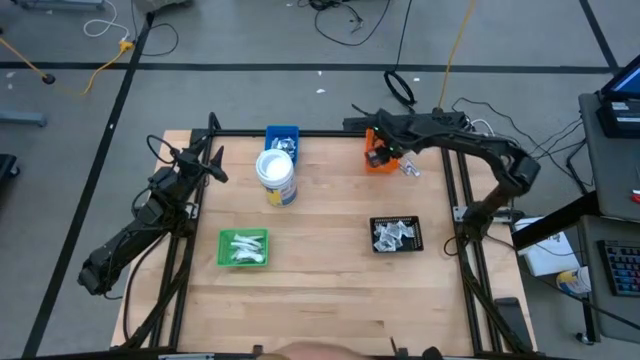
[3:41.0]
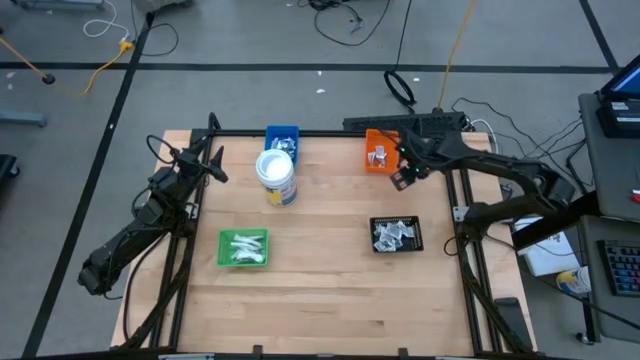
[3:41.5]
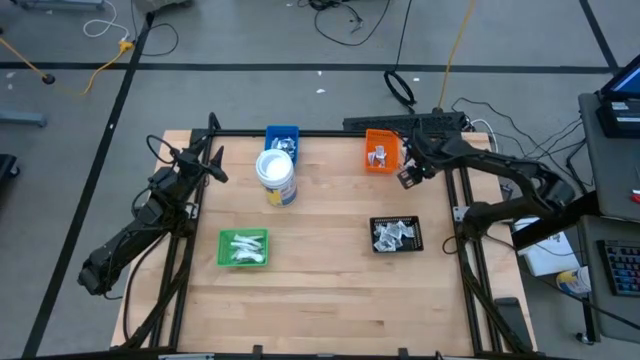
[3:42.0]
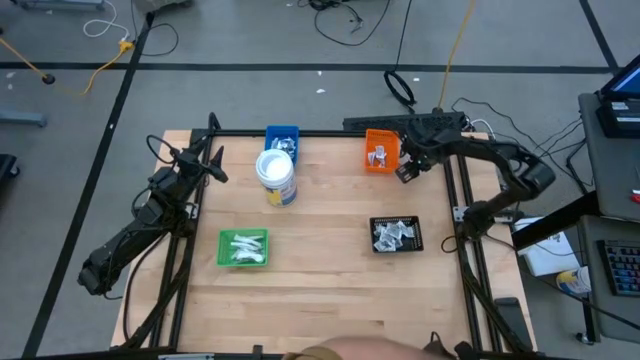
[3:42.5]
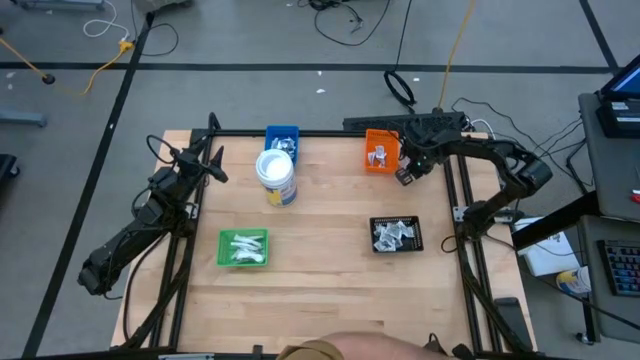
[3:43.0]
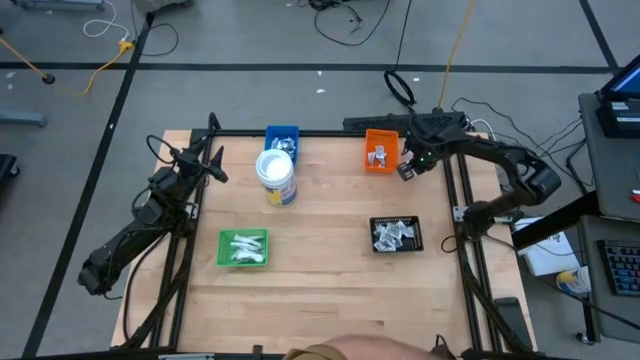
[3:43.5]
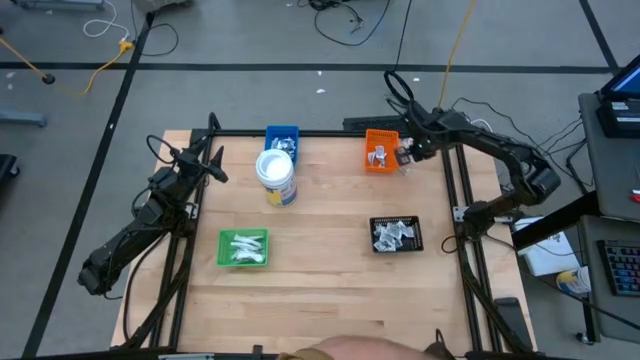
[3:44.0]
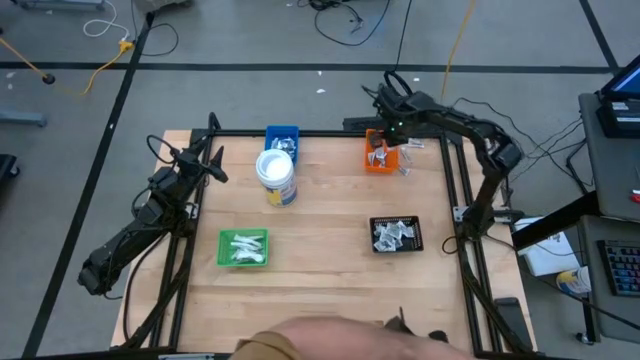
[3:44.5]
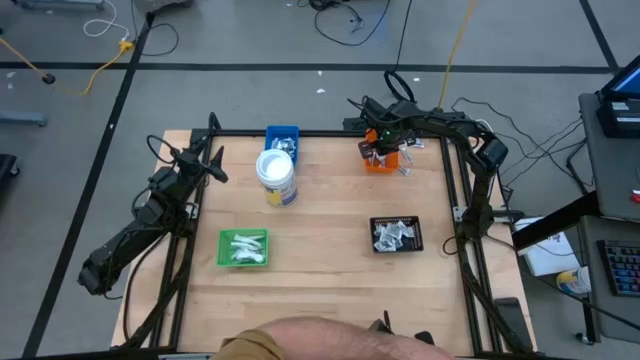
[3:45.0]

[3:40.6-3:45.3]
Task: Pick & Place First Aid Supplies
Put the orange ointment pack into the orange bin

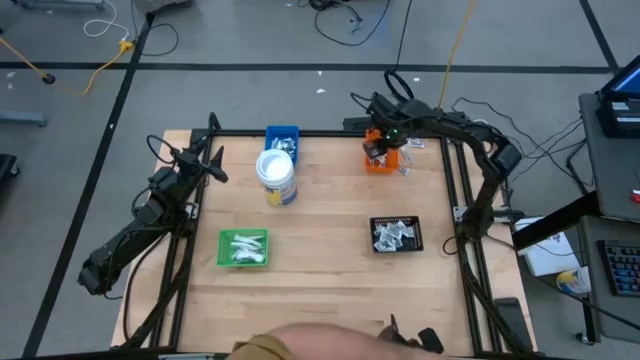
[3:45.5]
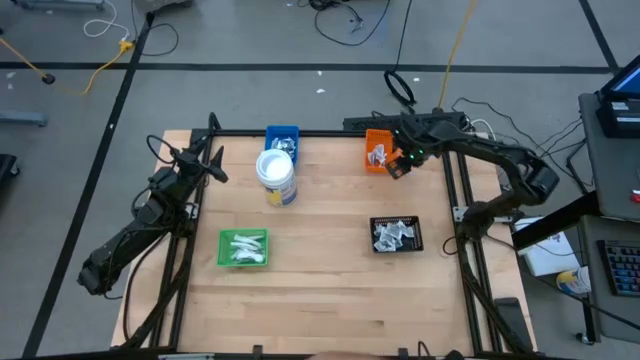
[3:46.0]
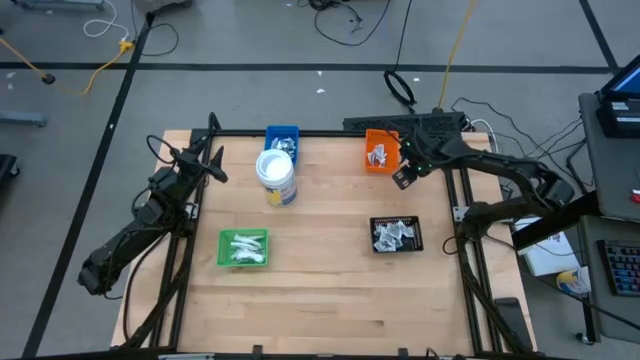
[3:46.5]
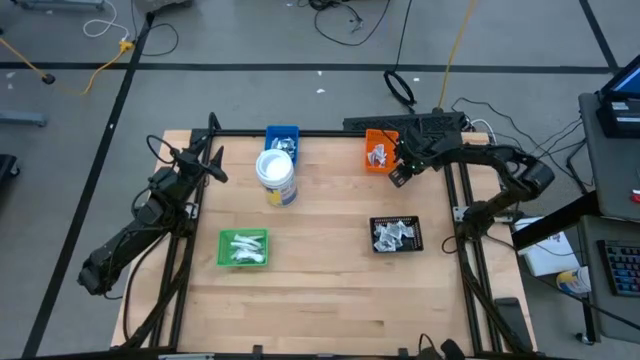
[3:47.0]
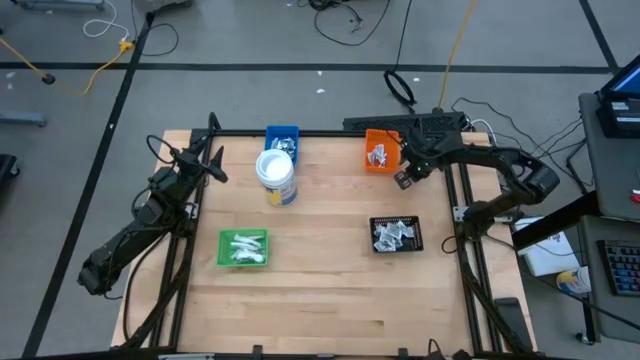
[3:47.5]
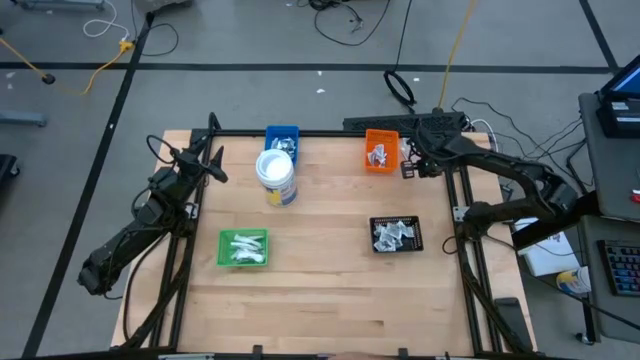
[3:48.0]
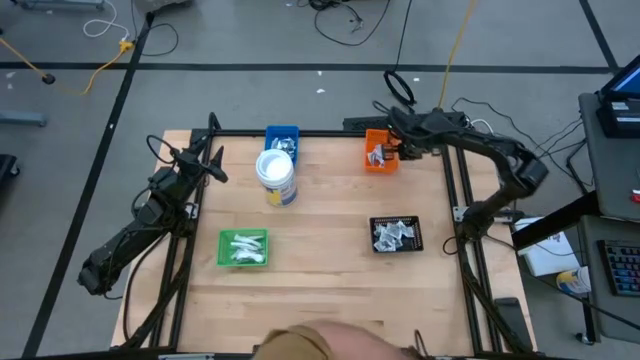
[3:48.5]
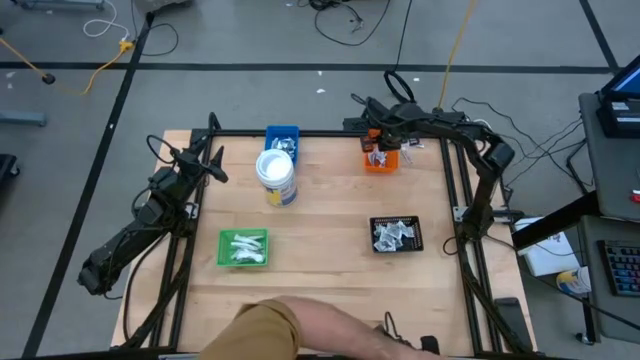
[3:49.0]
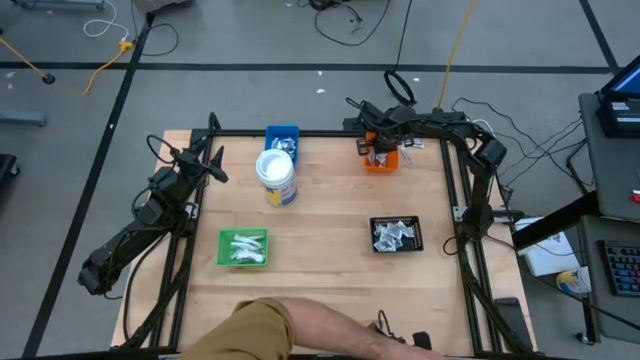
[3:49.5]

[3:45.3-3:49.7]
Put the orange ointment pack into the orange bin

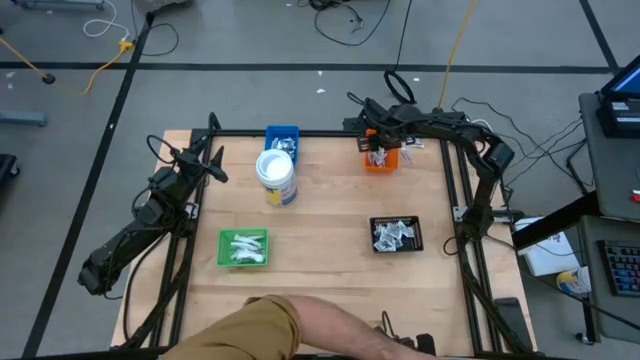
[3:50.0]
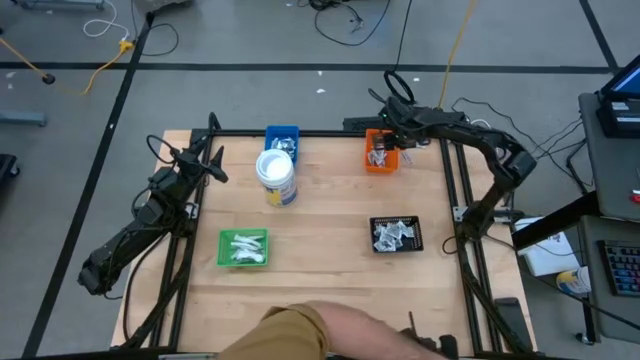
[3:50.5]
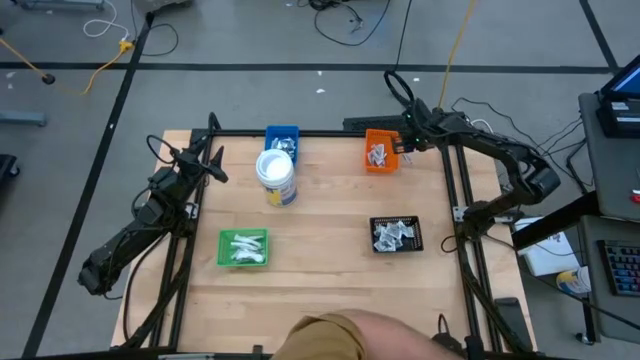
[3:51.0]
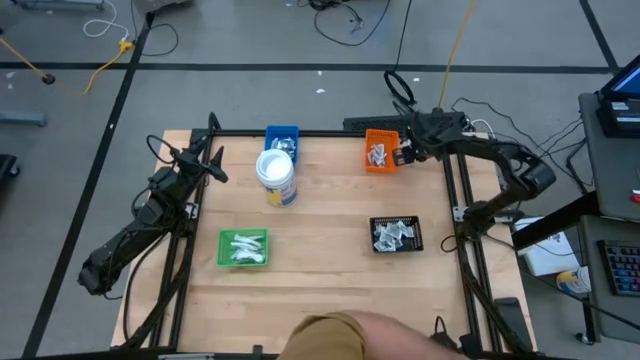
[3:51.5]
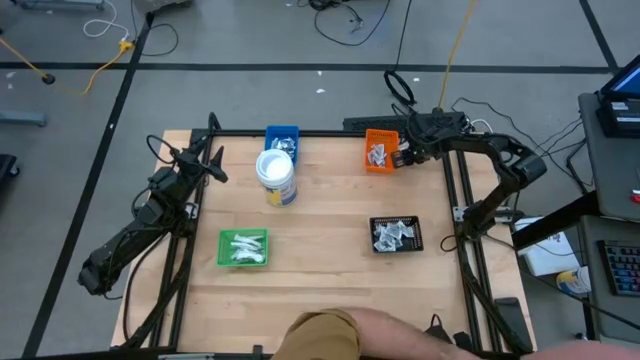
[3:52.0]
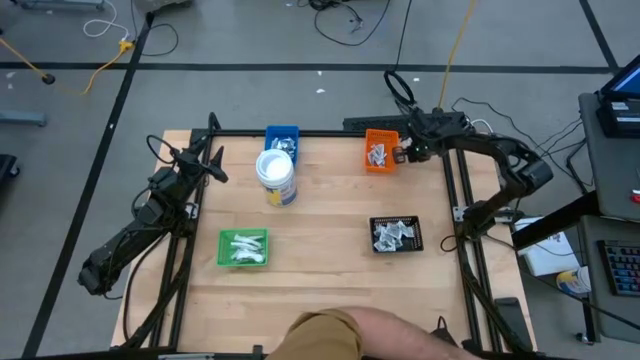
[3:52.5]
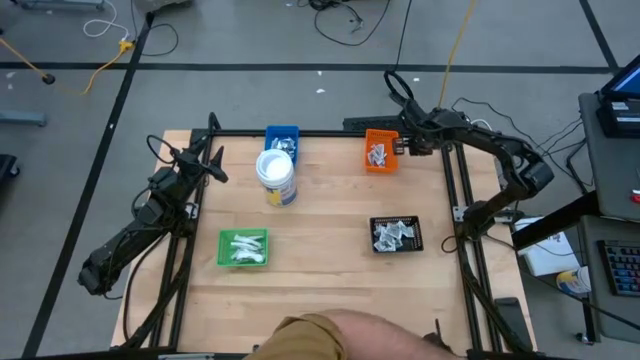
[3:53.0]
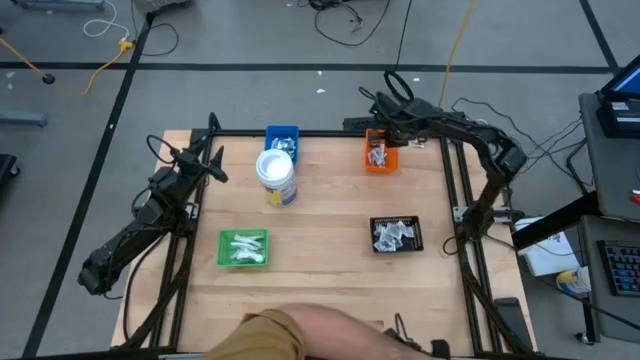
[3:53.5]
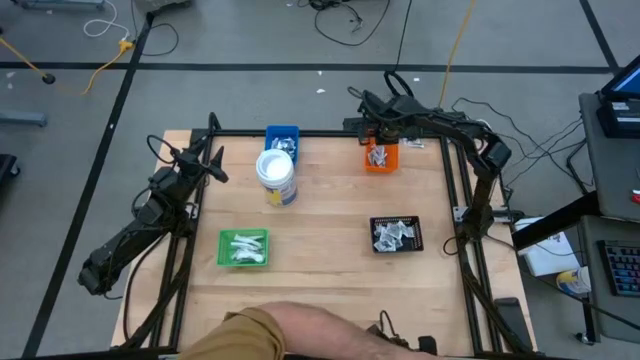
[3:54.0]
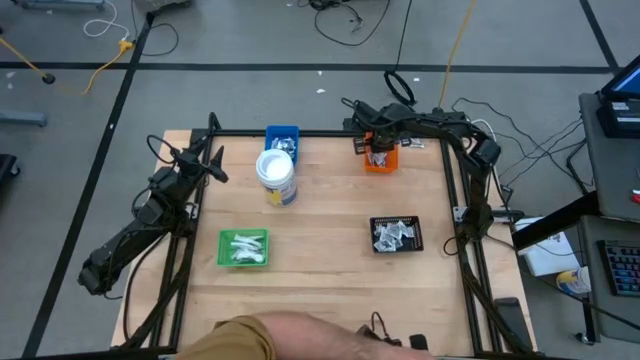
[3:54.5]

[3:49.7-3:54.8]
Put the orange ointment pack into the orange bin

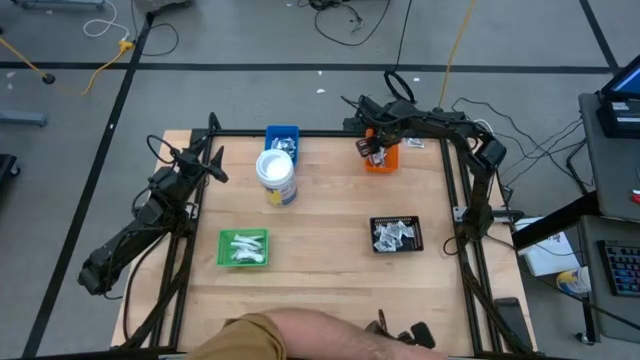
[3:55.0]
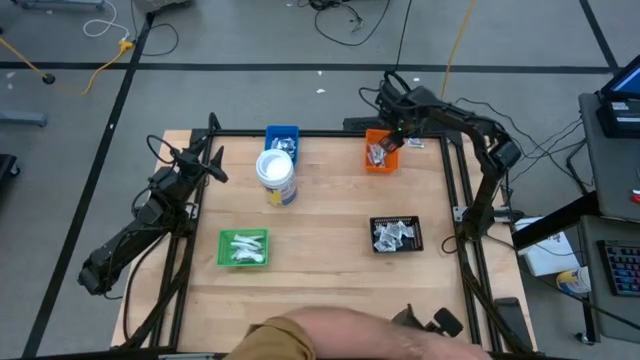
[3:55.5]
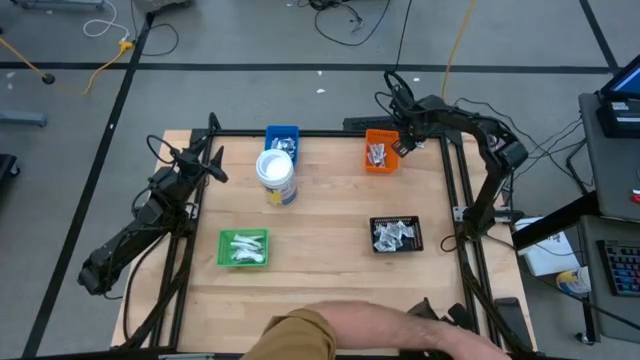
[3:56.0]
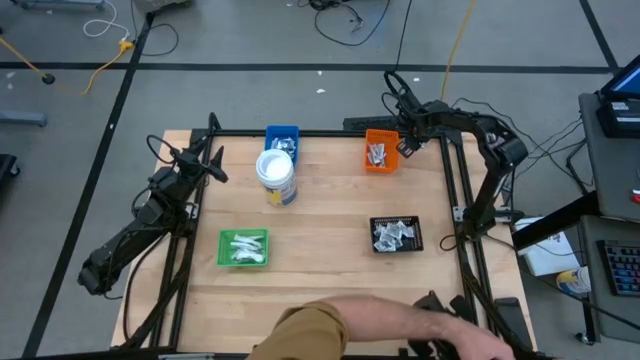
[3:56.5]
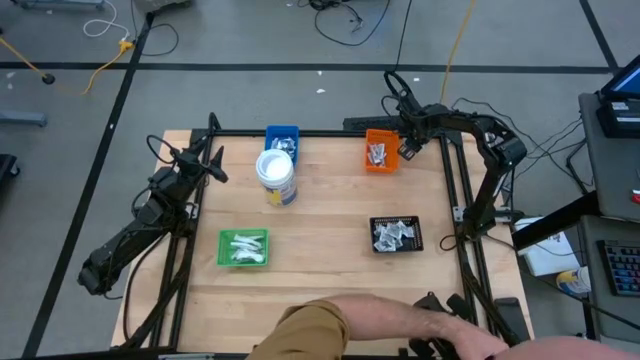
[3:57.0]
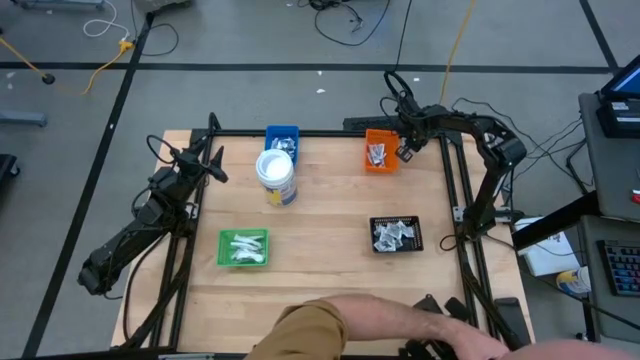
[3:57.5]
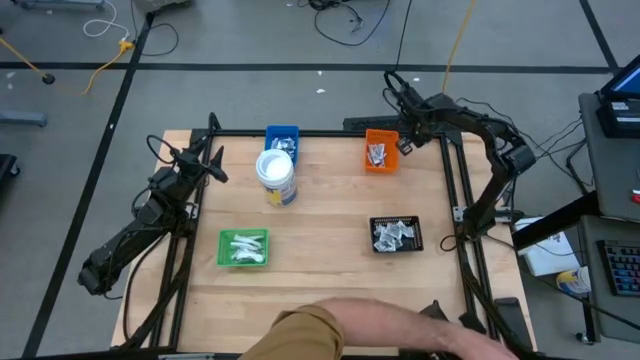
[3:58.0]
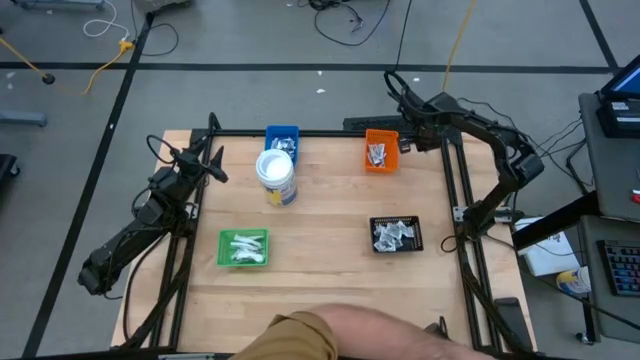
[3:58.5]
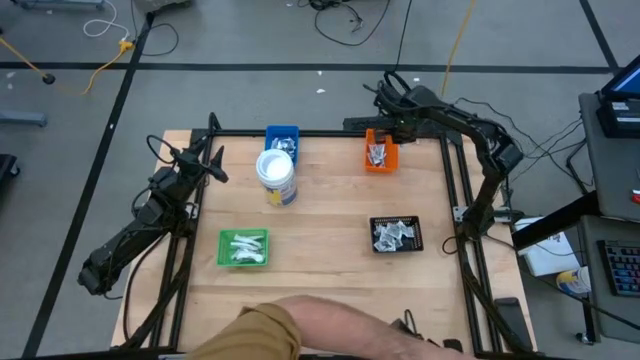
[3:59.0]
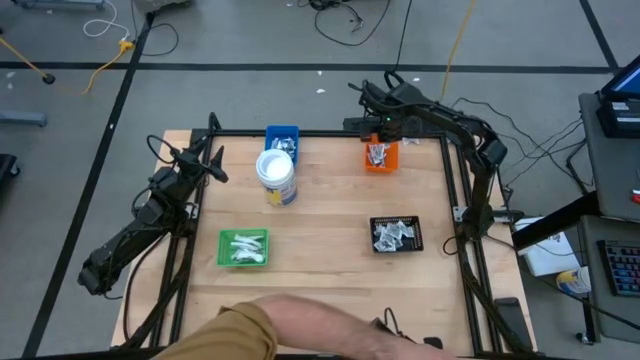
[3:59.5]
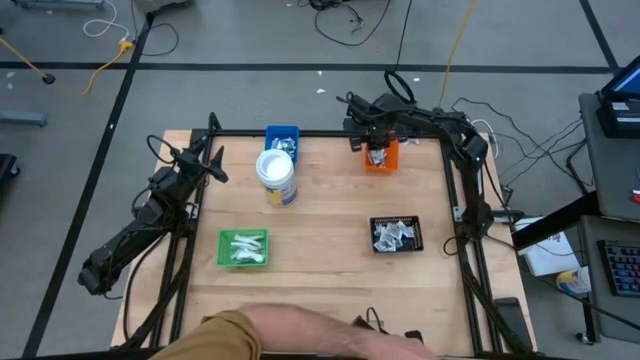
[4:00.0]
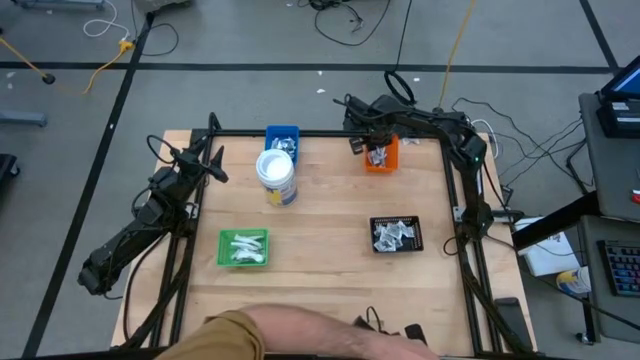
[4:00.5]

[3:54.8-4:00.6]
Put the orange ointment pack into the orange bin

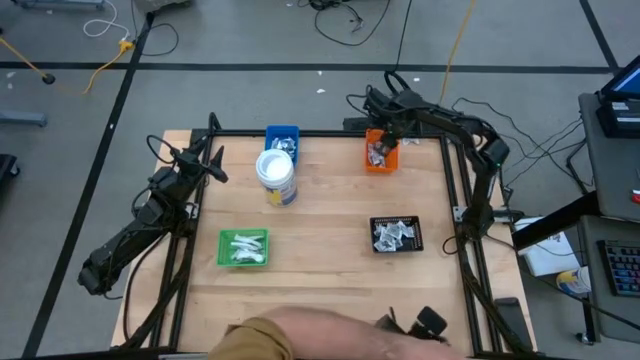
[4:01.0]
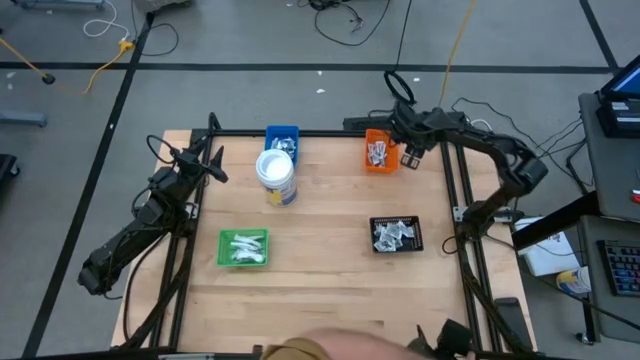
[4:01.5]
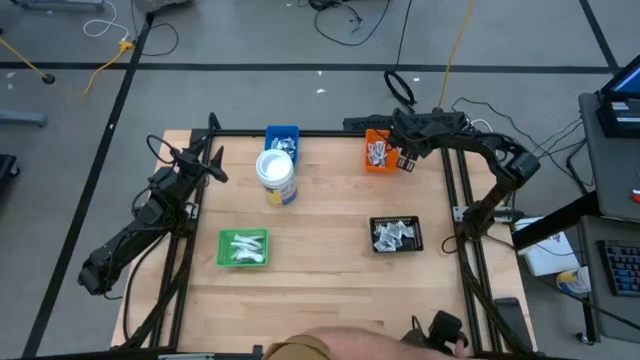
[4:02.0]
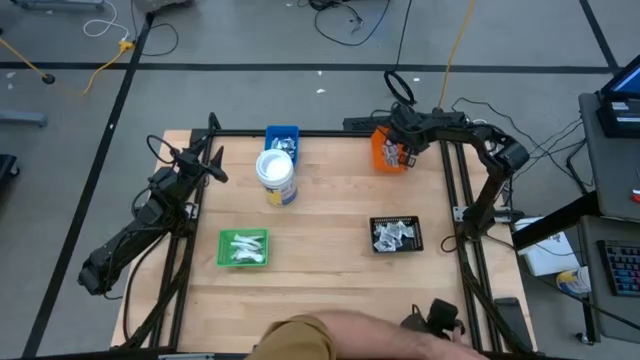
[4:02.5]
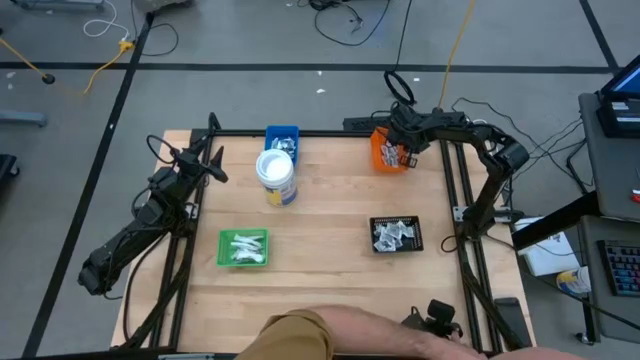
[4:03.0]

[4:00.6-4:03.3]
Put the orange ointment pack into the orange bin
